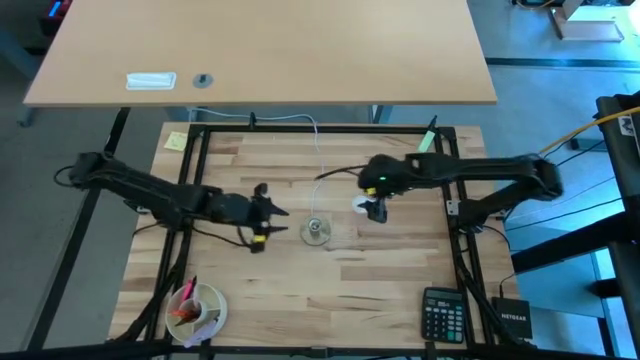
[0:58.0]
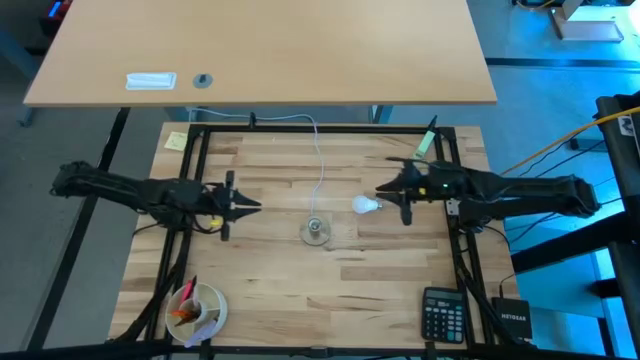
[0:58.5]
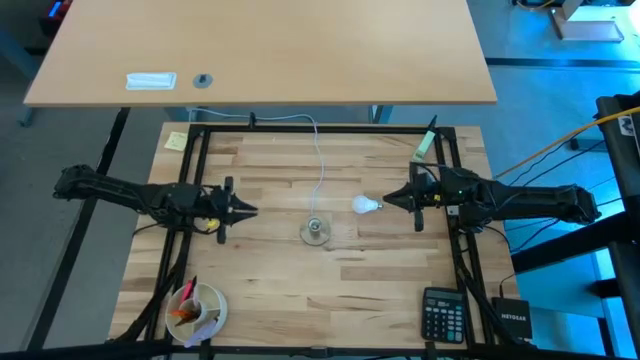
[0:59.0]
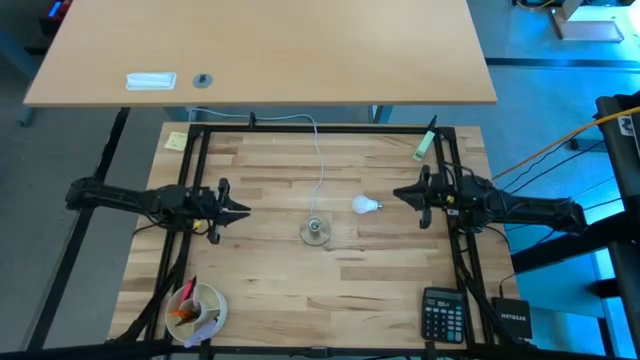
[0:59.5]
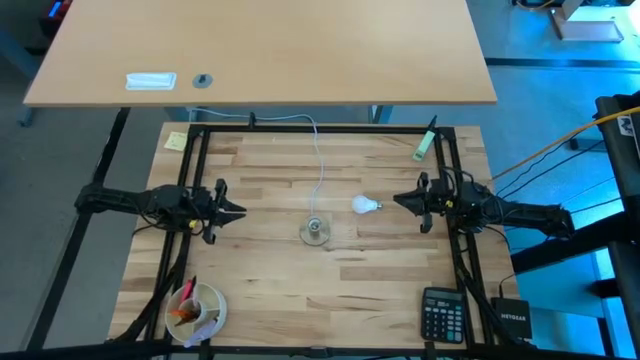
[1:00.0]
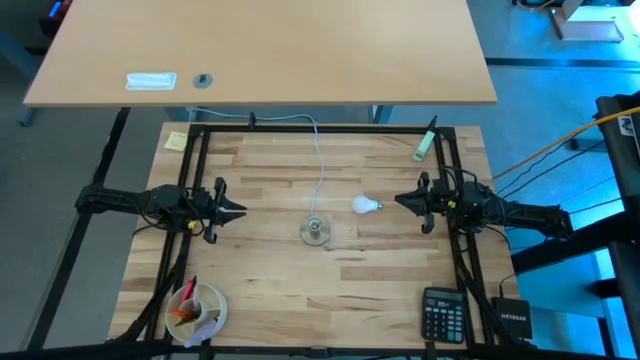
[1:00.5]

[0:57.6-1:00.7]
Task: Screw lightbulb
Return to Home Position

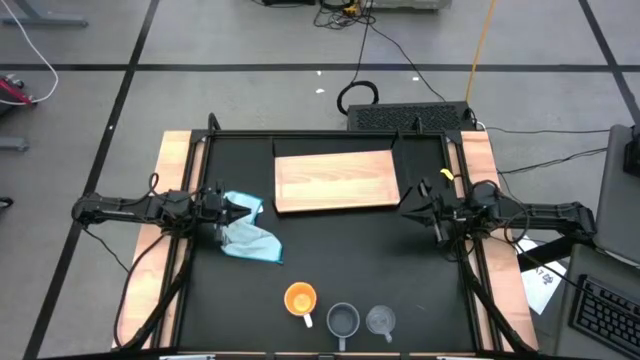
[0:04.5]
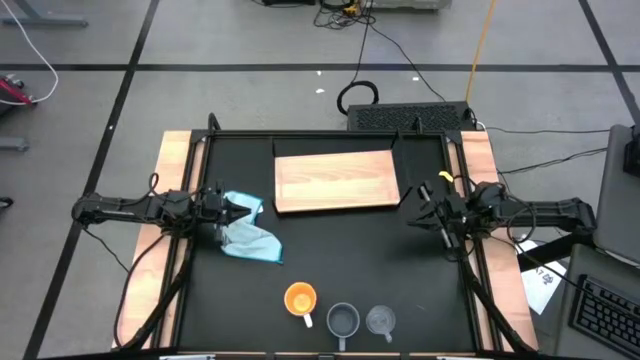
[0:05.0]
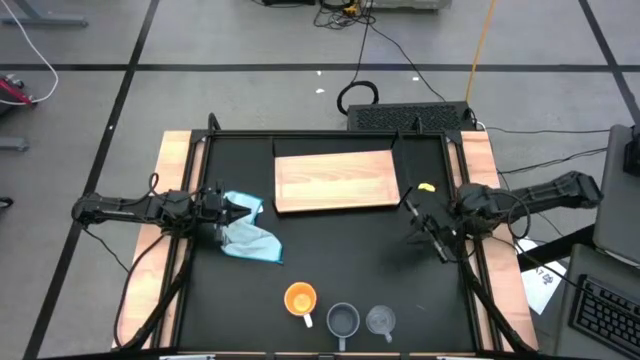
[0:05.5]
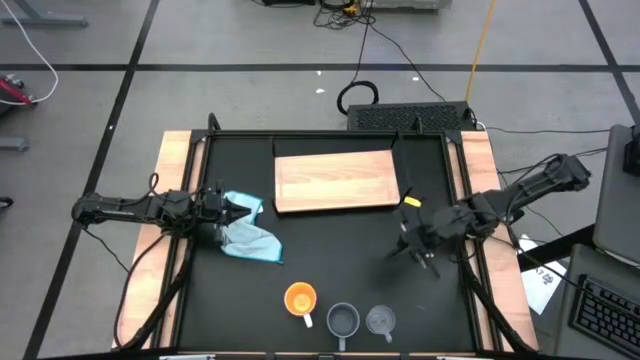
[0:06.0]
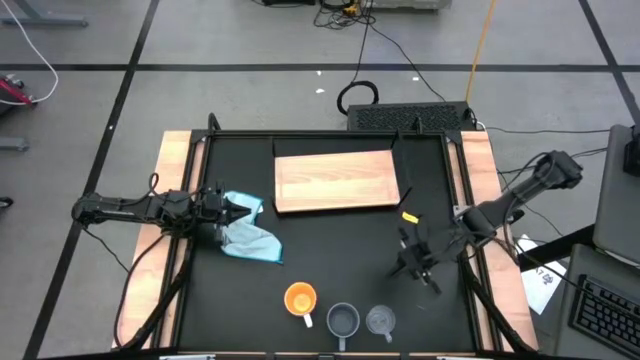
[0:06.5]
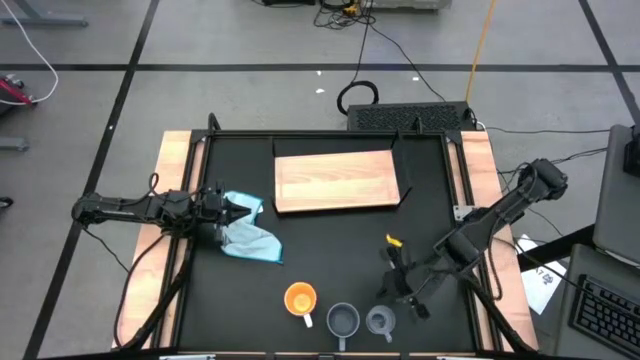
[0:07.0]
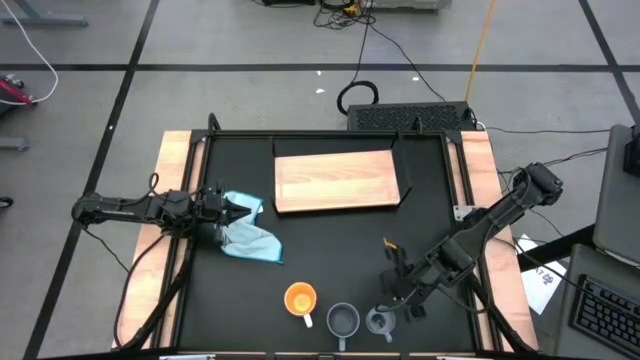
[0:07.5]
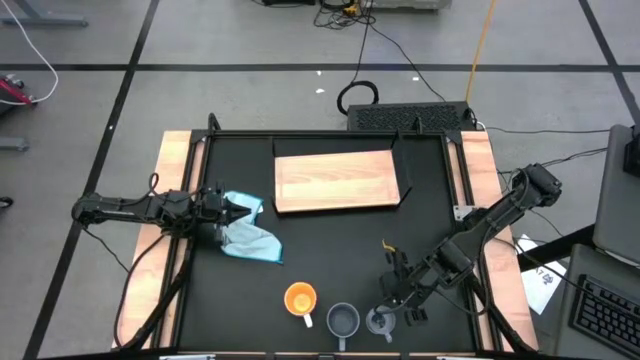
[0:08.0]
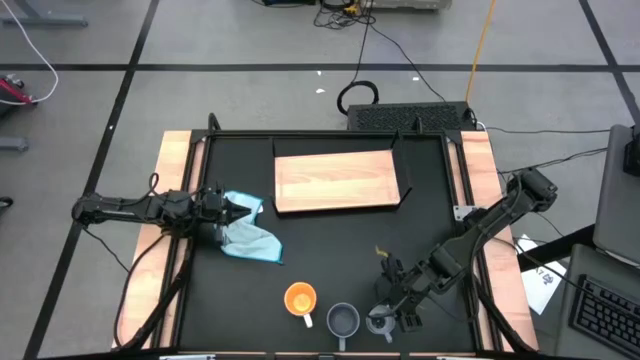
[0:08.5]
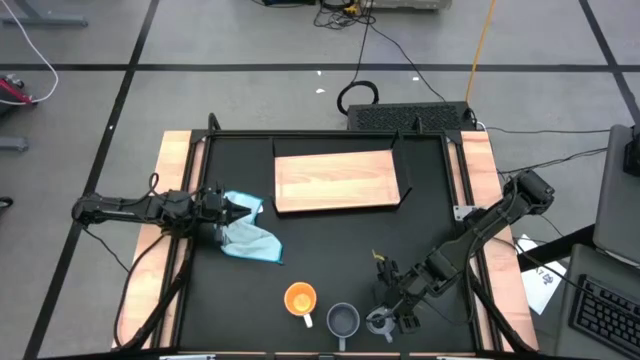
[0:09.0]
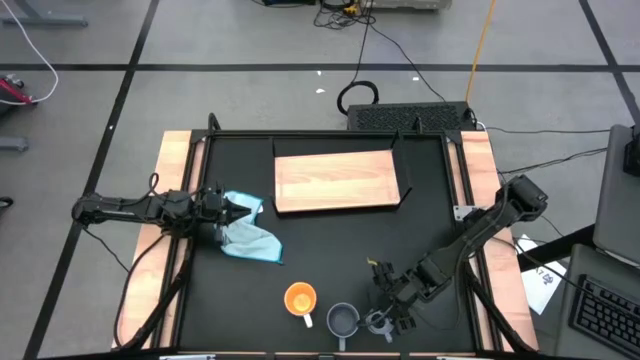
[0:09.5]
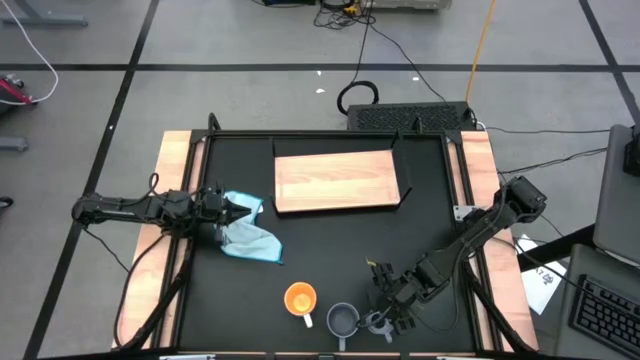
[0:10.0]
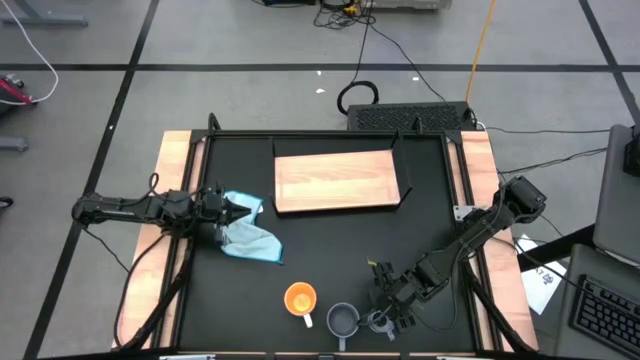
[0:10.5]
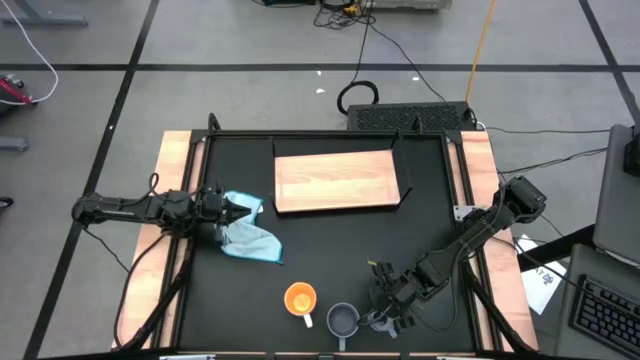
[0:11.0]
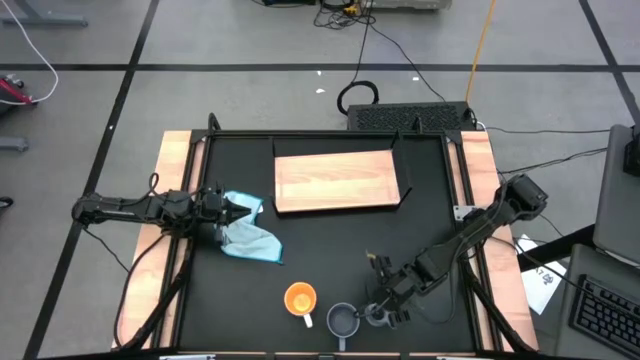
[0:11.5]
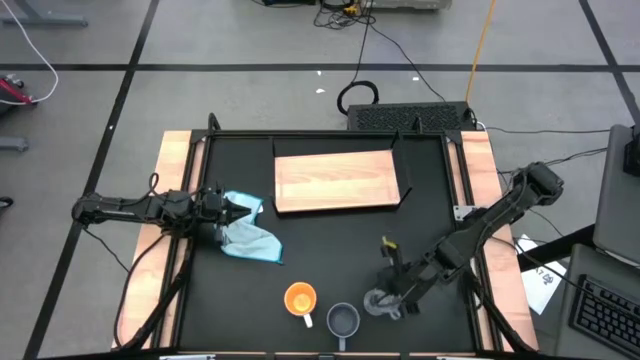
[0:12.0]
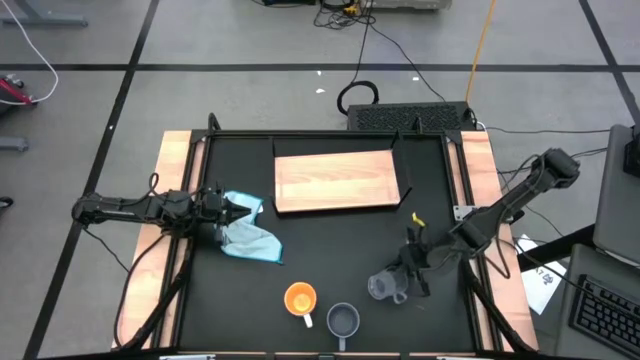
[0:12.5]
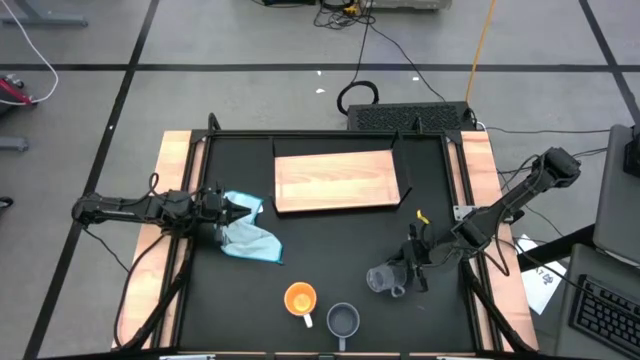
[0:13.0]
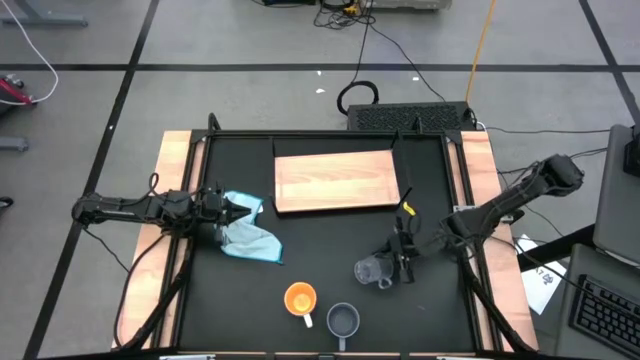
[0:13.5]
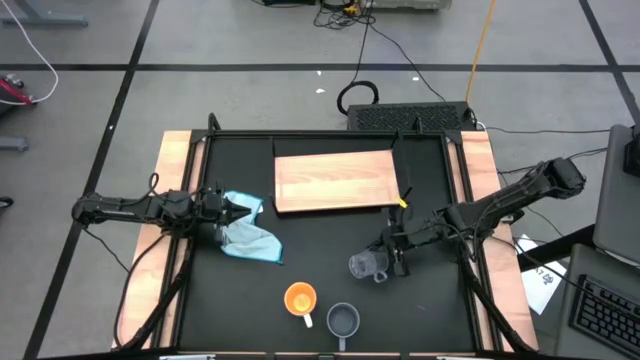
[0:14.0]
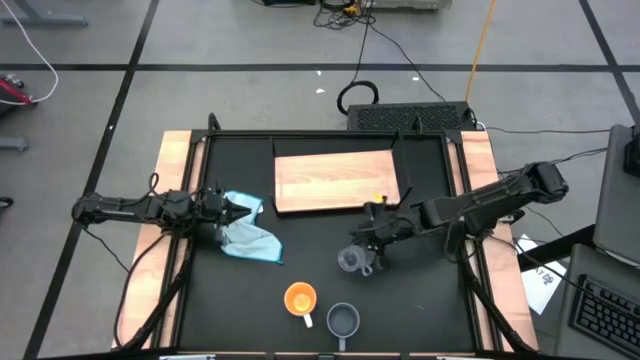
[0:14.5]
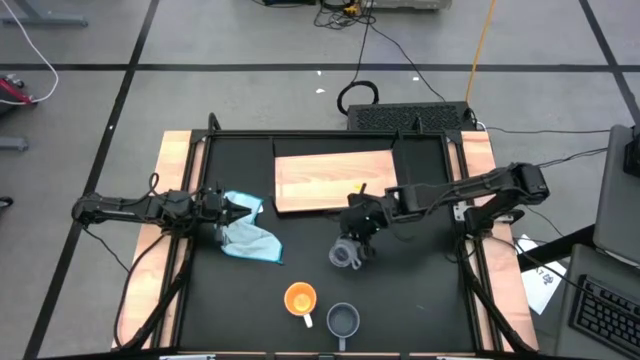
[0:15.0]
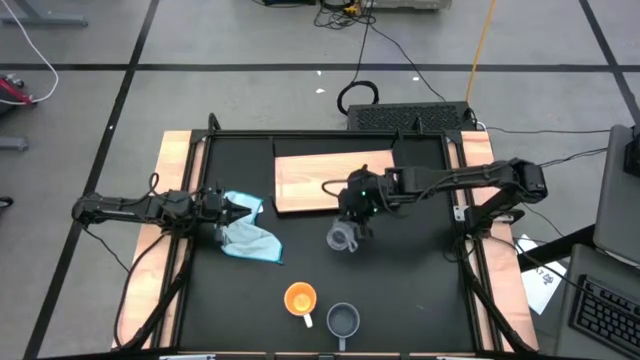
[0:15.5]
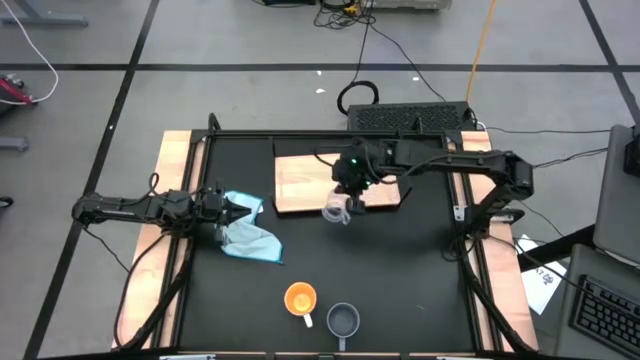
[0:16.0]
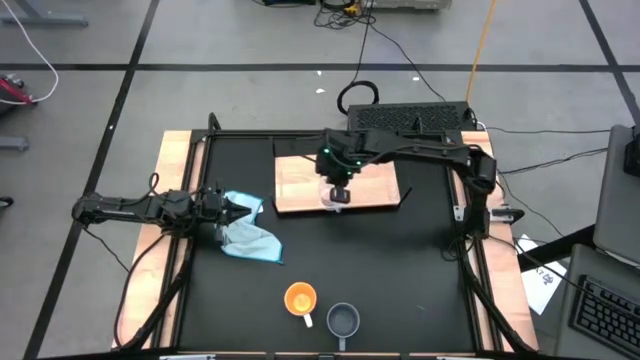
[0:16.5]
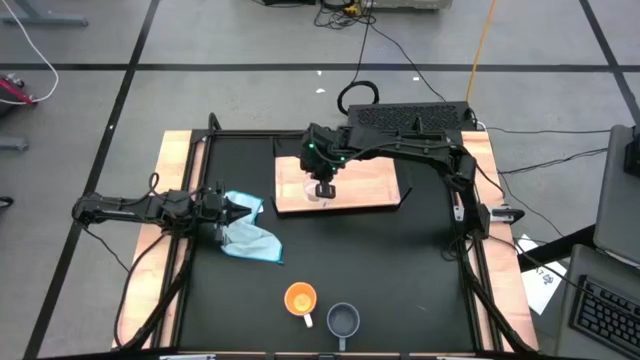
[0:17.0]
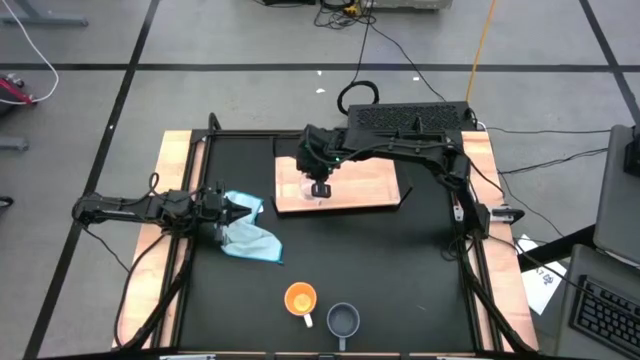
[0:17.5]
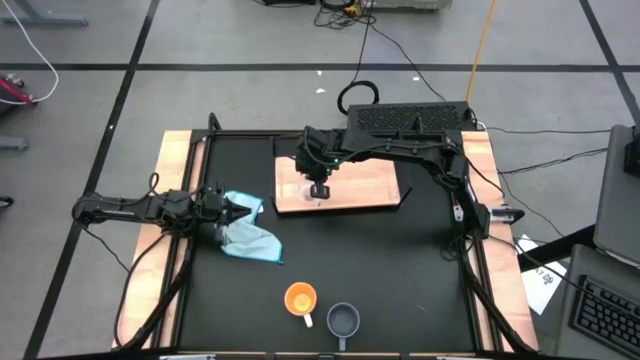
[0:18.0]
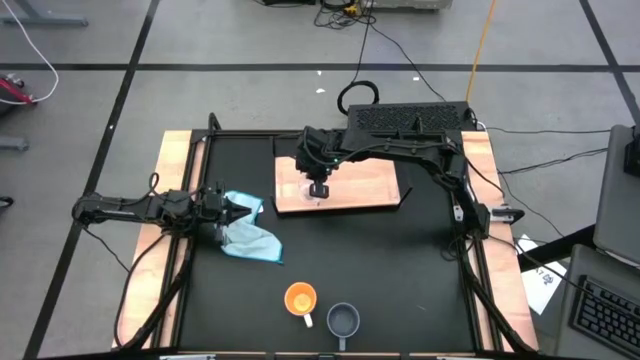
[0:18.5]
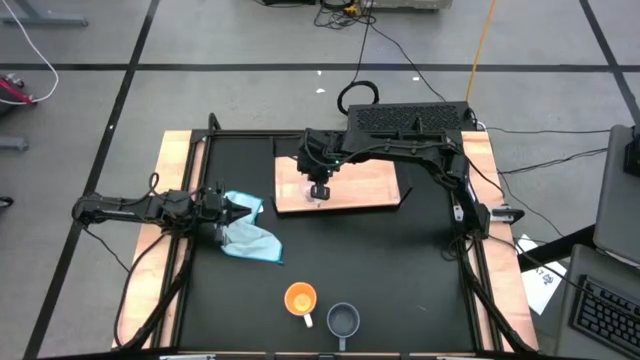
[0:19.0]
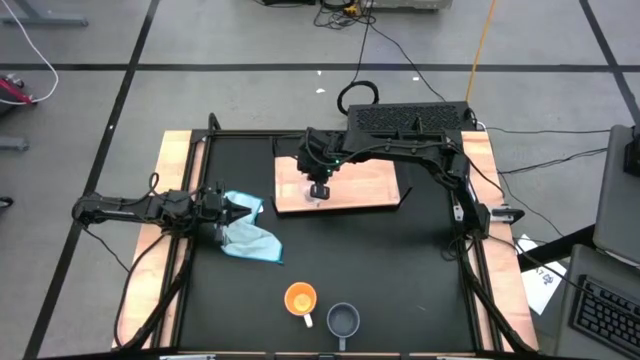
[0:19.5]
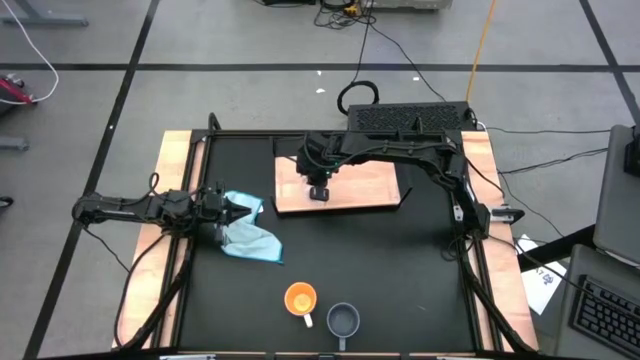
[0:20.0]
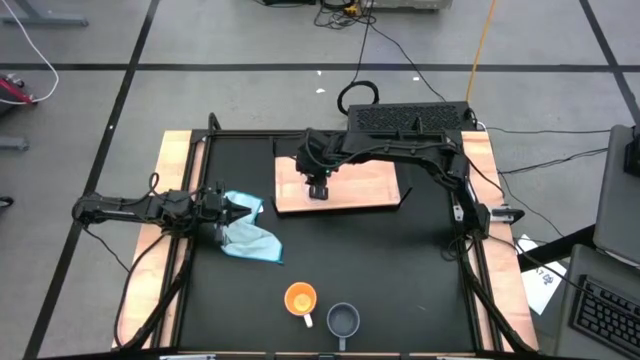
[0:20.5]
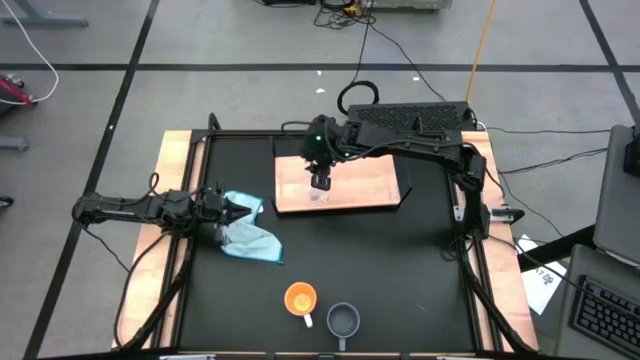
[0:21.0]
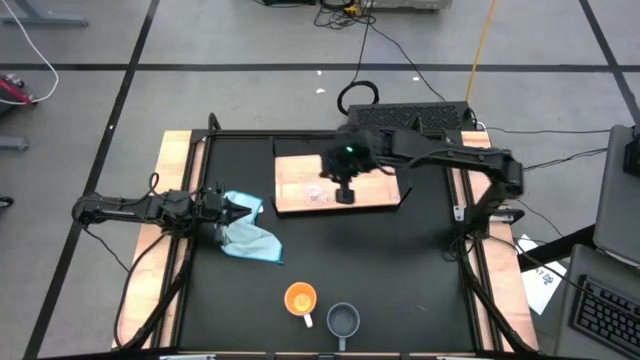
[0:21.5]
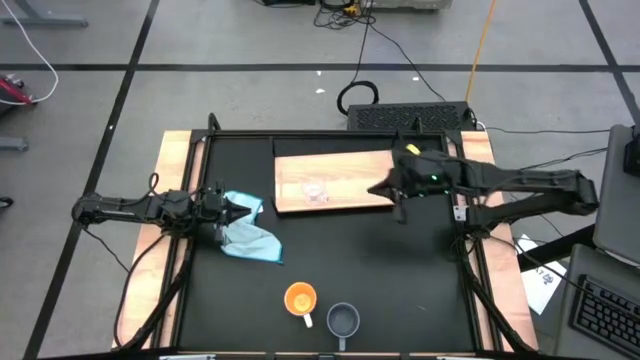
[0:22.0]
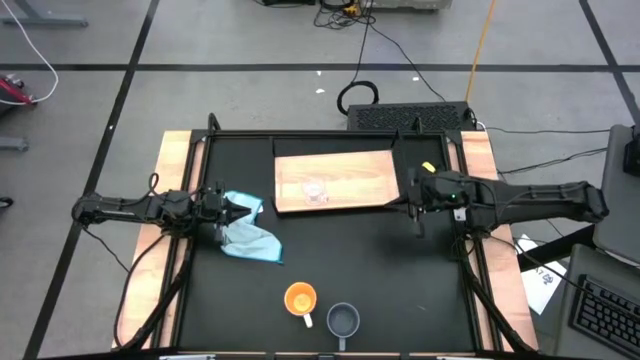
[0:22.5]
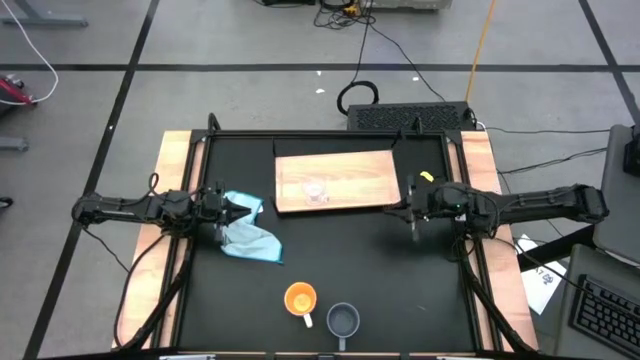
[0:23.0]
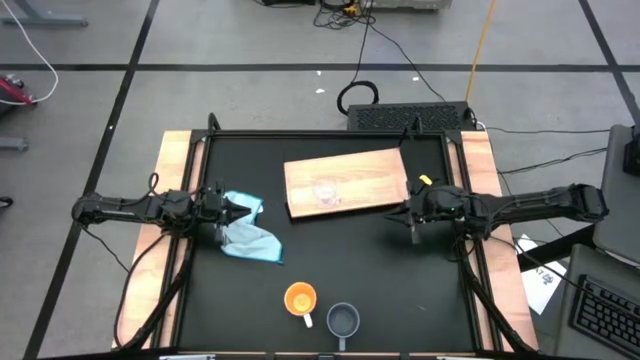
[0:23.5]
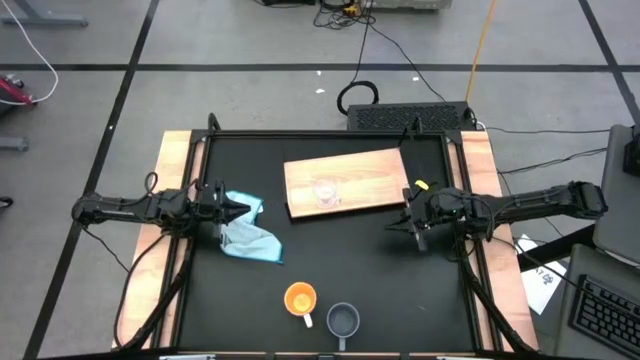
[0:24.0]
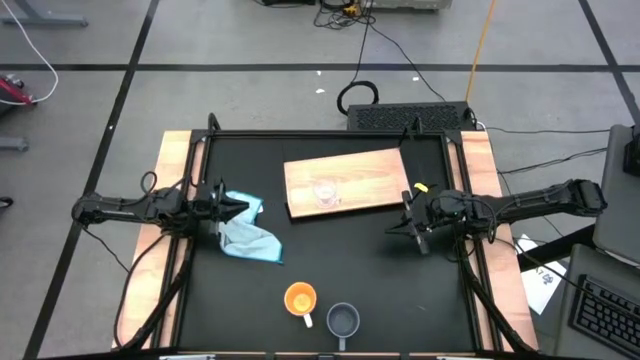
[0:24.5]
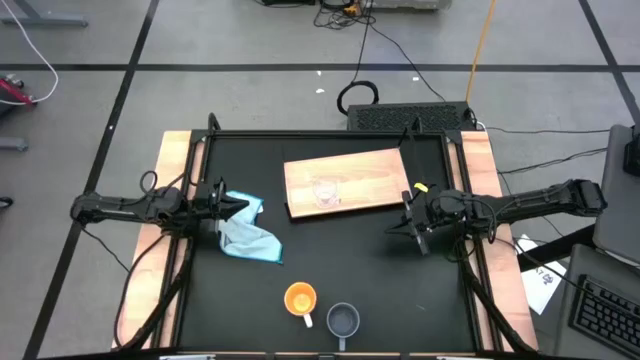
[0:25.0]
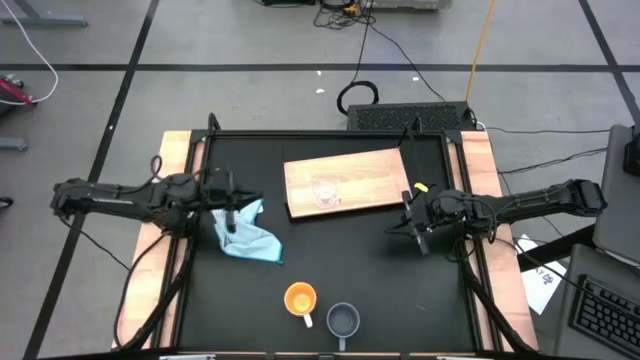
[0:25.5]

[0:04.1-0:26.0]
Task: Stack small to large cups/mugs on shelf
Put the transparent mug on the shelf
